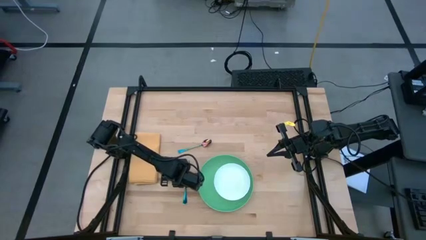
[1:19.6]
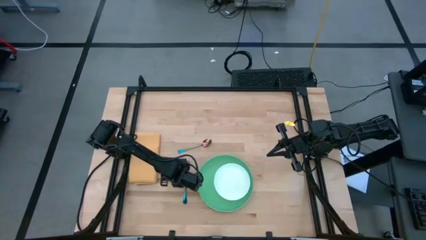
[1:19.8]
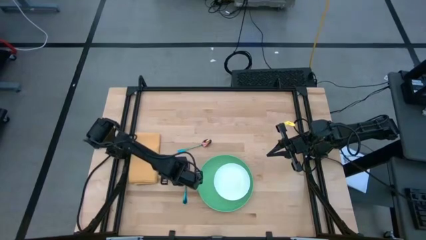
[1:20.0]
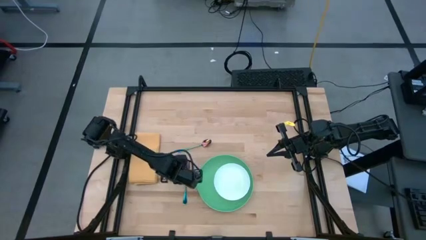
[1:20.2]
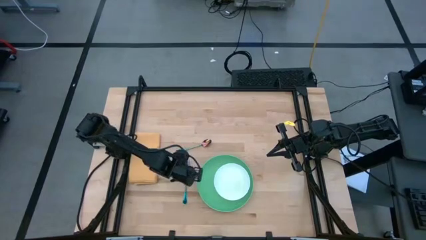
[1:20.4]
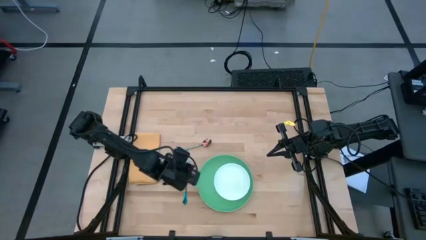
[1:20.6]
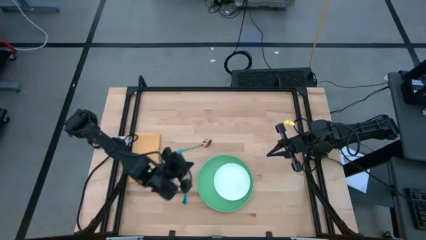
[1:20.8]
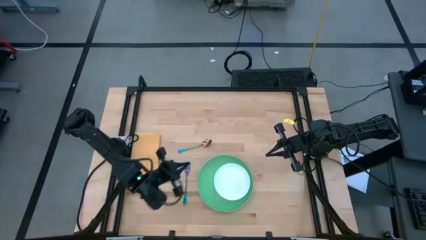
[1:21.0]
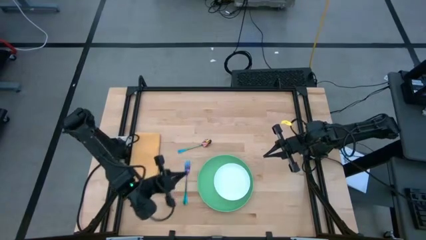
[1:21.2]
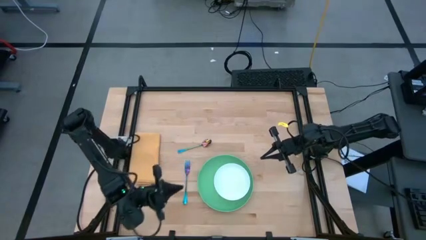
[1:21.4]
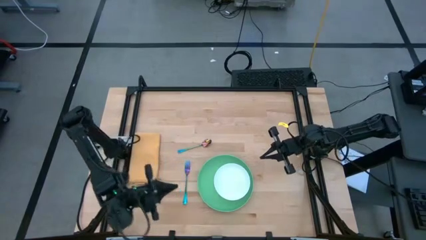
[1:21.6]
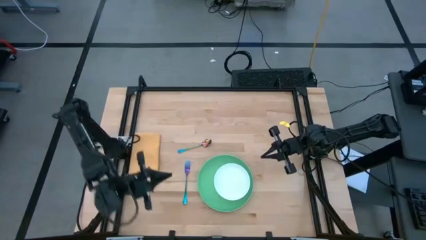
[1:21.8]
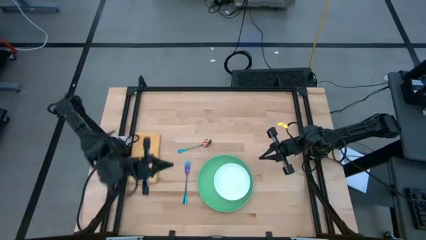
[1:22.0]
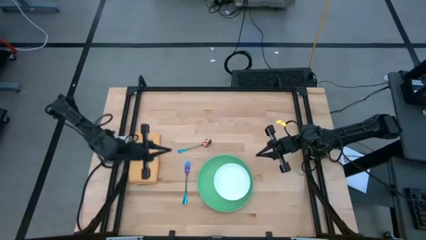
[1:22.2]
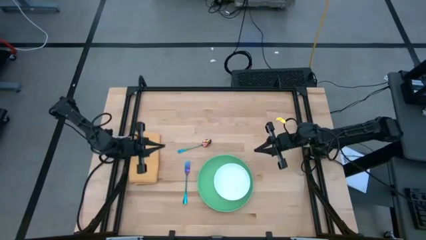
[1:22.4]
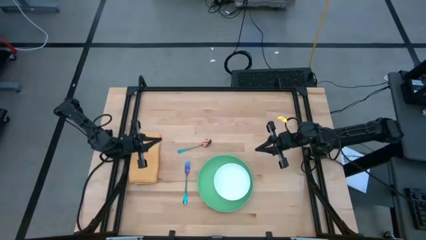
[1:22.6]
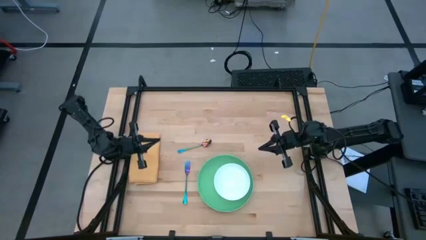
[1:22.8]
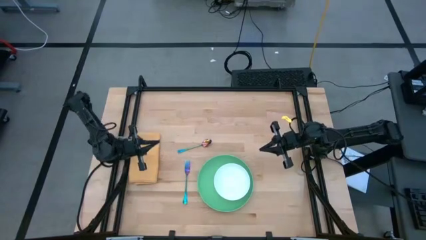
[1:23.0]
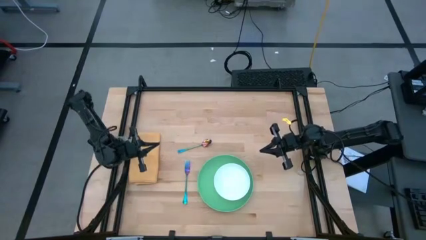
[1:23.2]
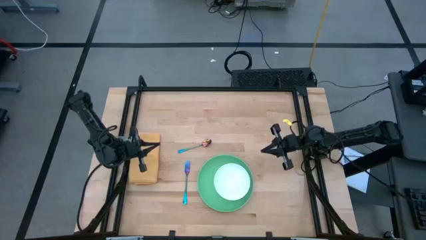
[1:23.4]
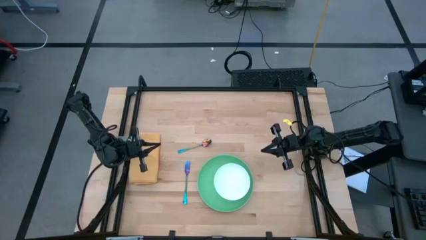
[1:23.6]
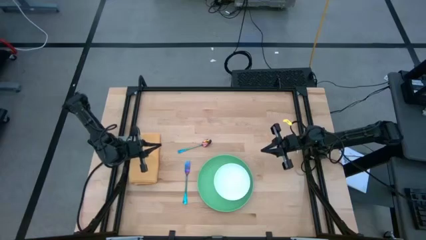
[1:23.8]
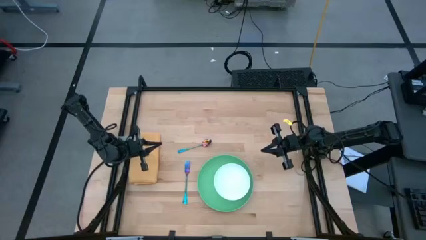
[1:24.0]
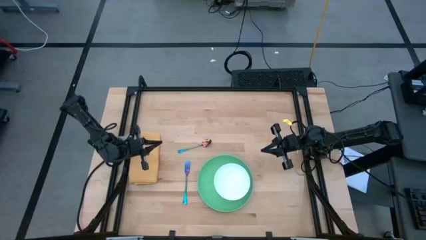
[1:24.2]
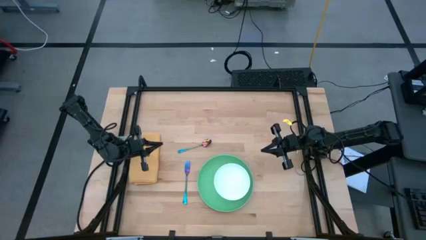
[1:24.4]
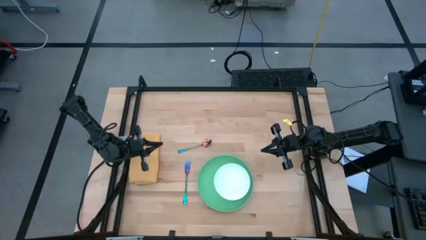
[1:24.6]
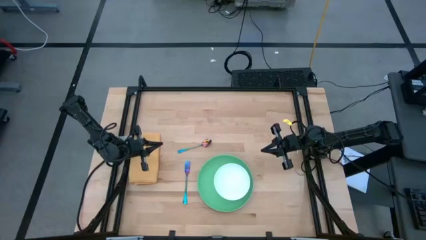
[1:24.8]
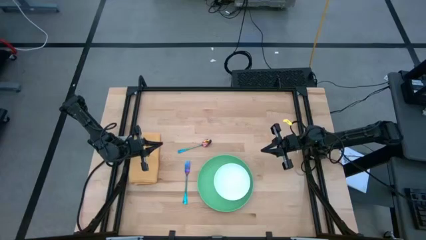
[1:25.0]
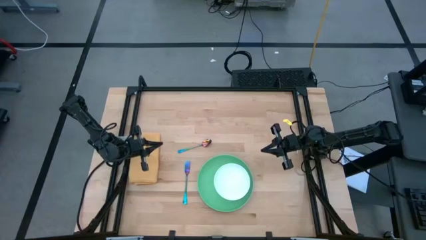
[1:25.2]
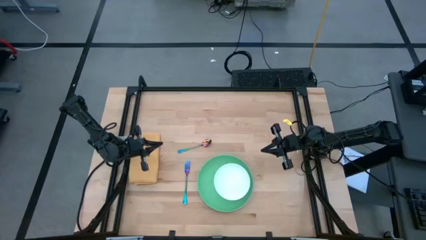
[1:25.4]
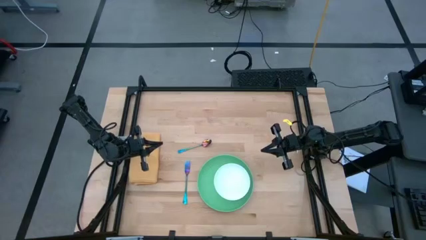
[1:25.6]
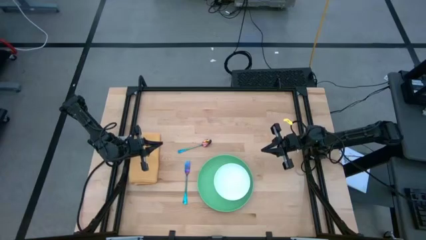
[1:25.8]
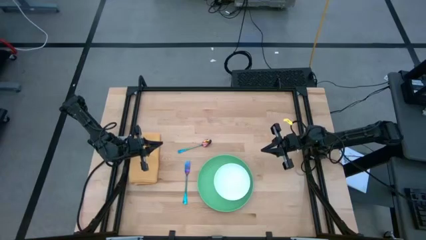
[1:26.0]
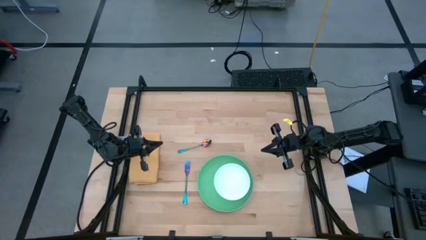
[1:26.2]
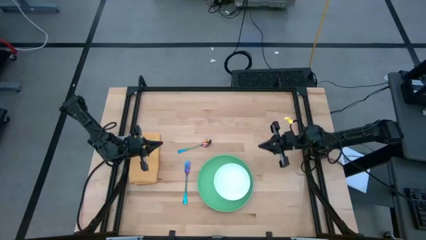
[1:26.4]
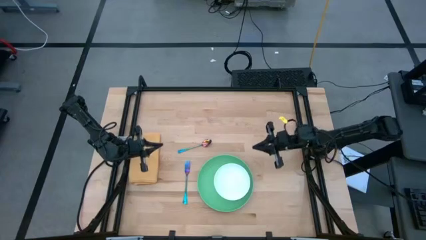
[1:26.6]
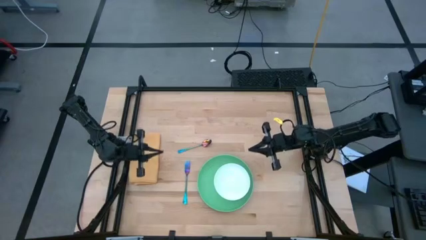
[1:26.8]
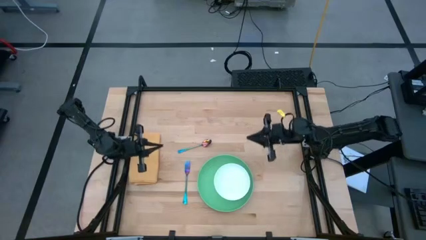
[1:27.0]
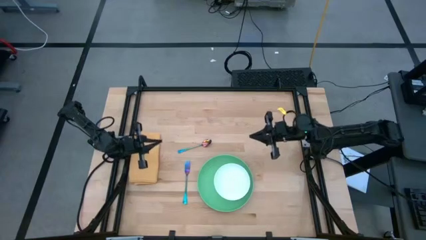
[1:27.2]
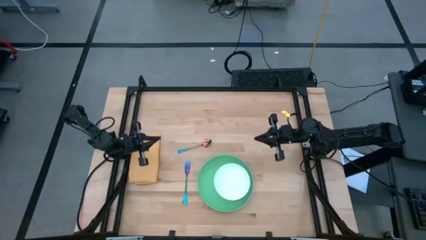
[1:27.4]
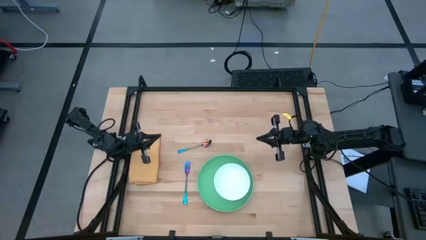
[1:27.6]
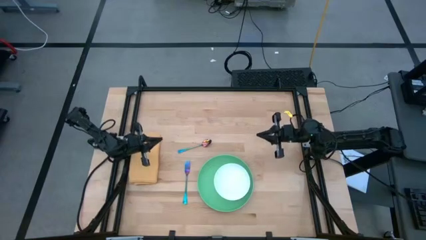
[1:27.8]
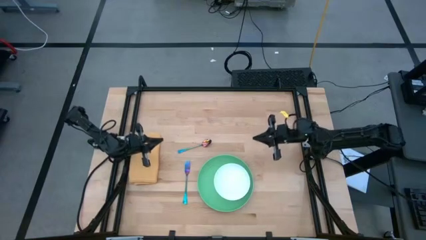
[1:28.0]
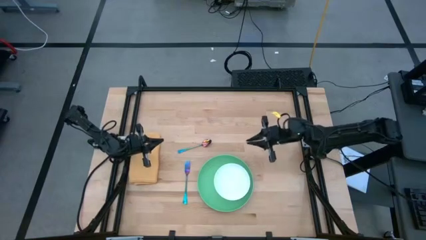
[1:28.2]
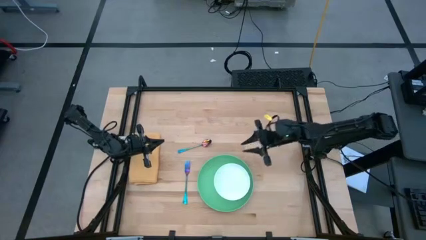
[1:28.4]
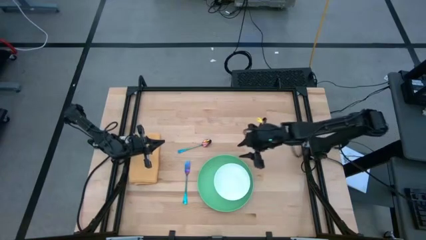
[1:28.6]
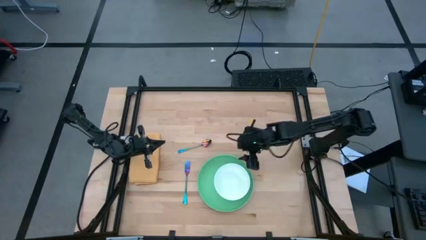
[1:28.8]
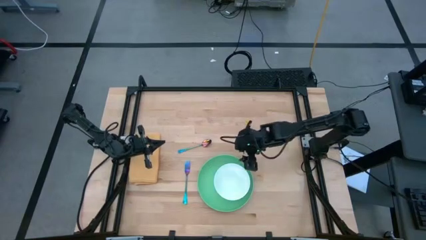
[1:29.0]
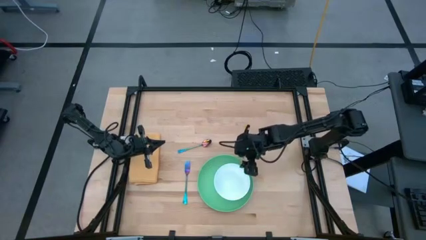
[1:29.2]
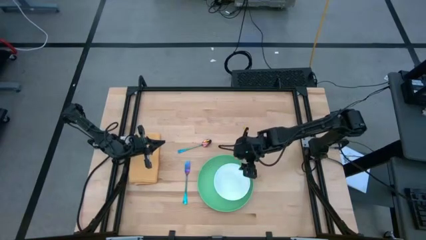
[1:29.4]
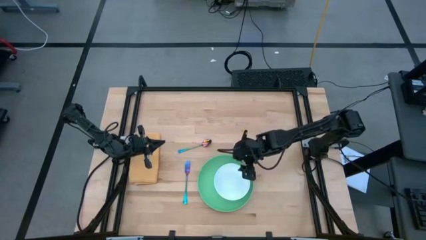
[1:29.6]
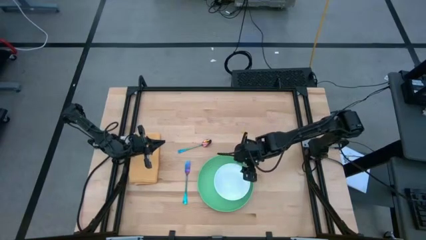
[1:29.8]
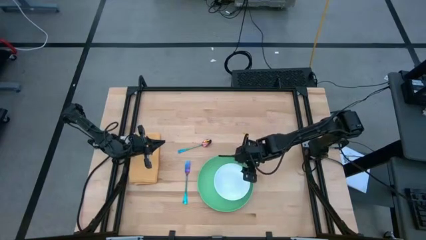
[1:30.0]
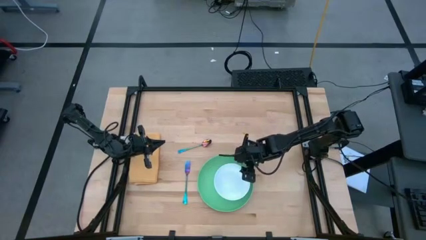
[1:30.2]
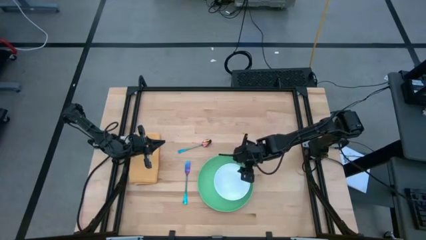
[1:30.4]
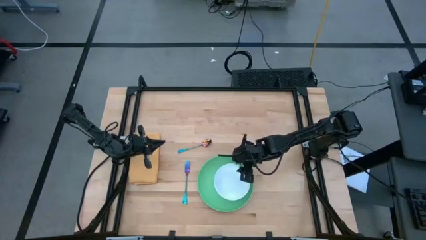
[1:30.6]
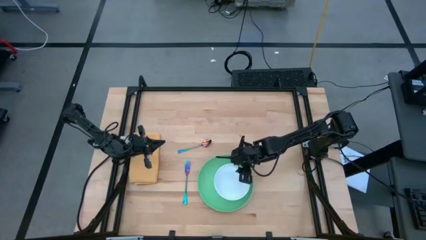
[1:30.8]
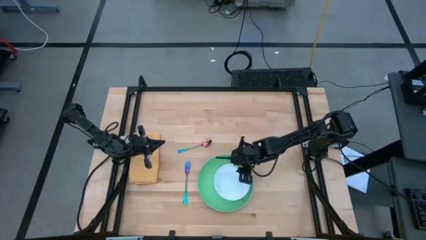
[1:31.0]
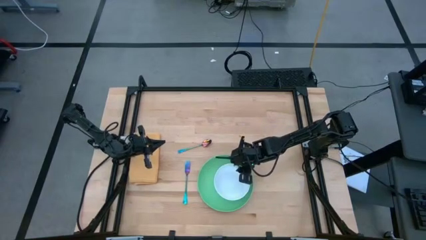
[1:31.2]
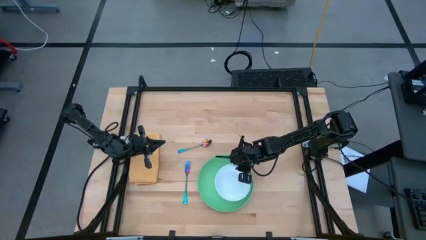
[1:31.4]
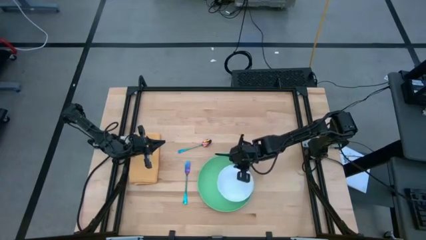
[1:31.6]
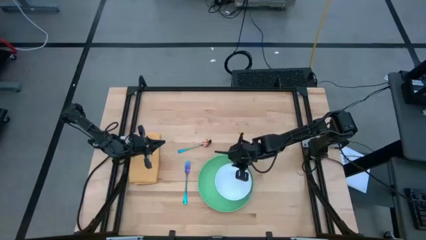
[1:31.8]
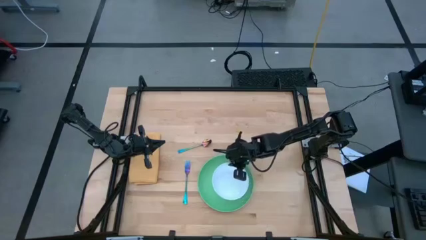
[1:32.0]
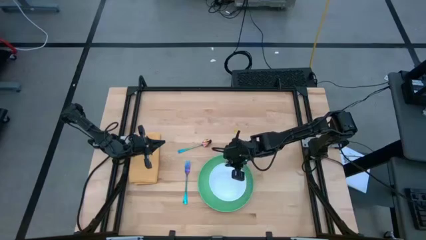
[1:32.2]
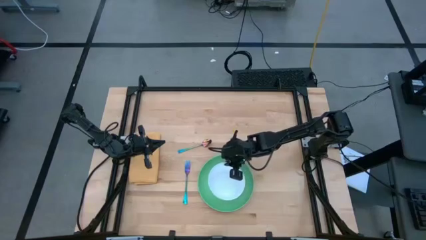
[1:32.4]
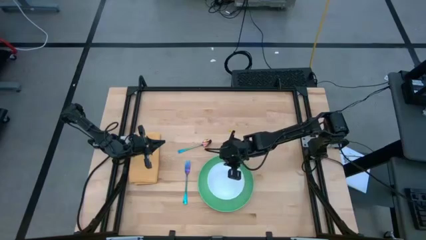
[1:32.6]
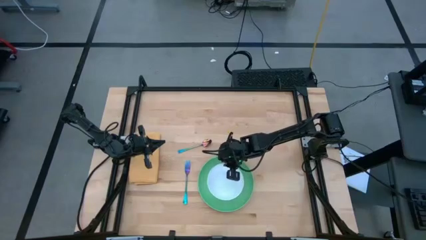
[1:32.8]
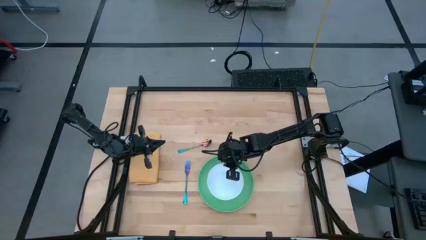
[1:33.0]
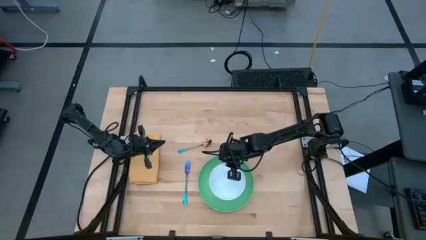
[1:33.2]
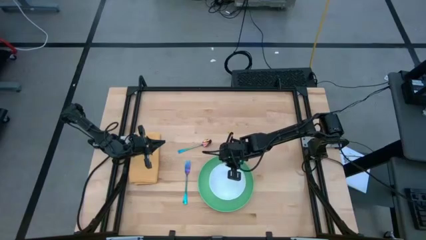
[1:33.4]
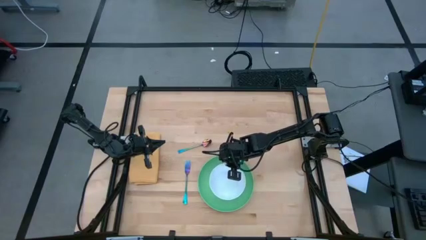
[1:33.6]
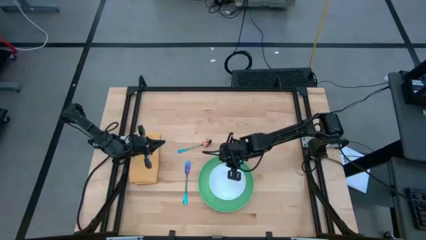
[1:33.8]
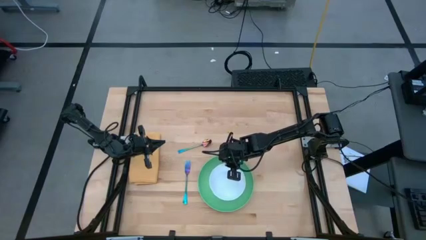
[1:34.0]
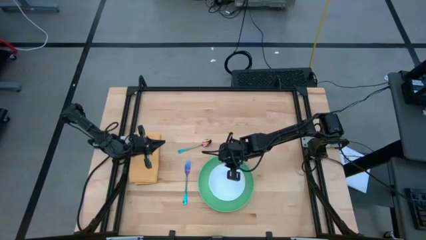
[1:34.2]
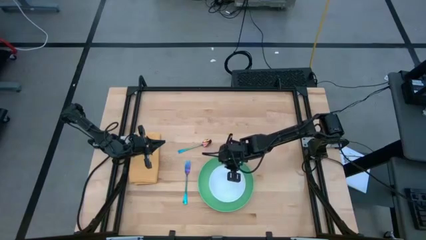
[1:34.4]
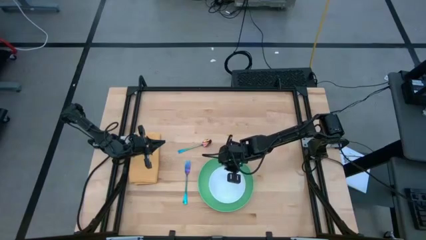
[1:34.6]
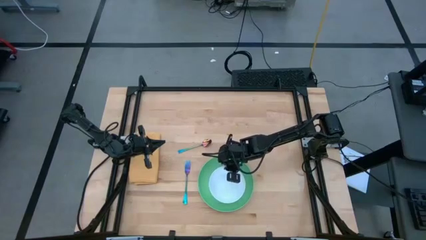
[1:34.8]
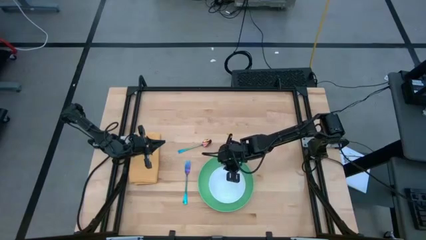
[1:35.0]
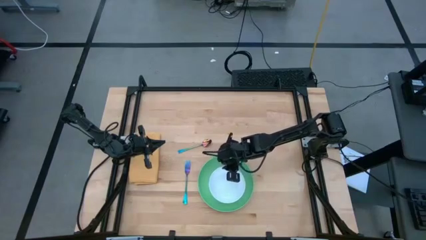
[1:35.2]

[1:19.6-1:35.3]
Task: Set table place
Adjust the violet fork and white bowl
